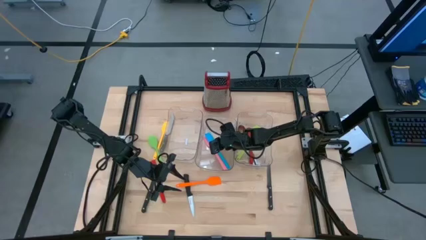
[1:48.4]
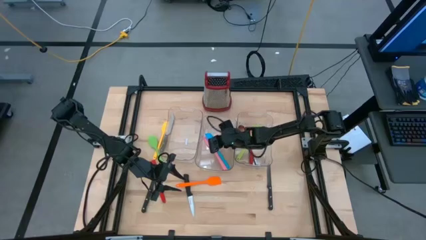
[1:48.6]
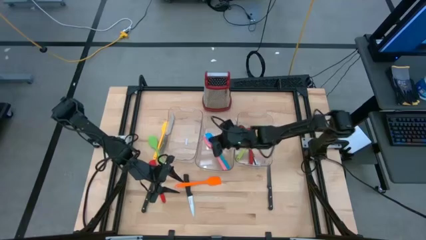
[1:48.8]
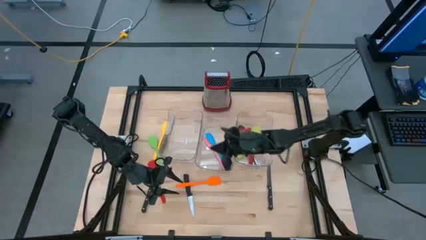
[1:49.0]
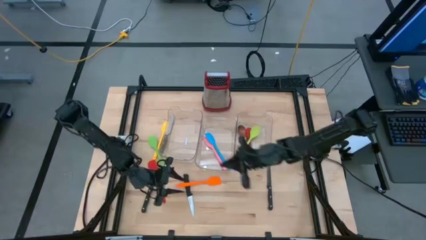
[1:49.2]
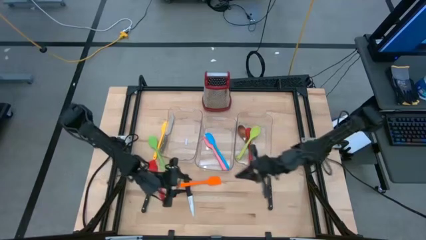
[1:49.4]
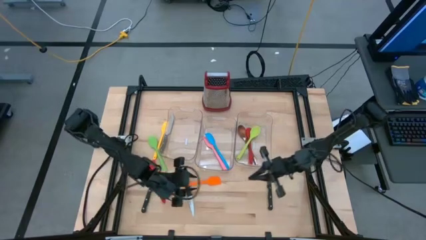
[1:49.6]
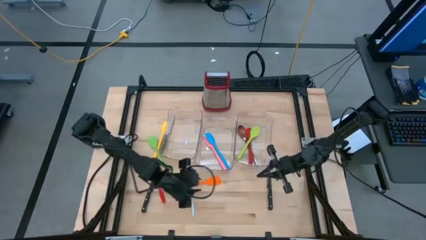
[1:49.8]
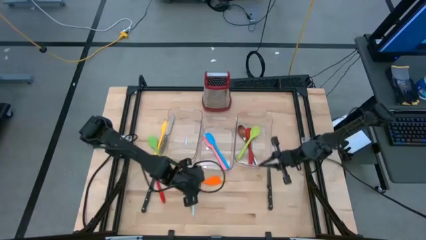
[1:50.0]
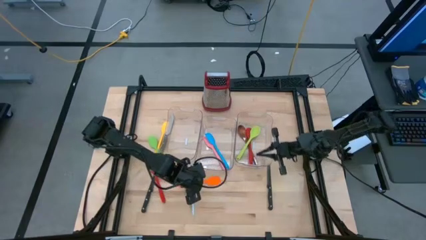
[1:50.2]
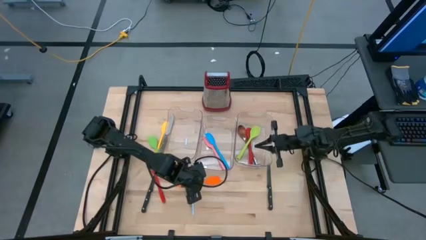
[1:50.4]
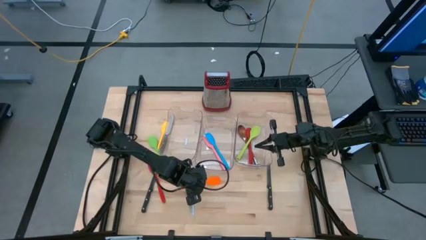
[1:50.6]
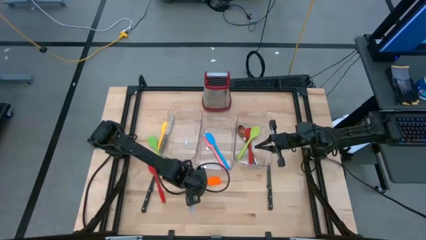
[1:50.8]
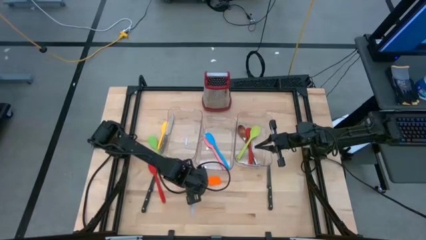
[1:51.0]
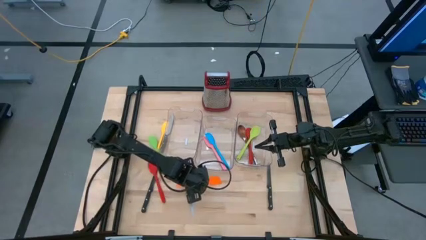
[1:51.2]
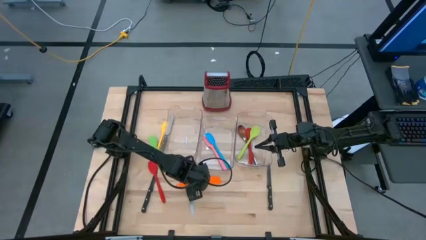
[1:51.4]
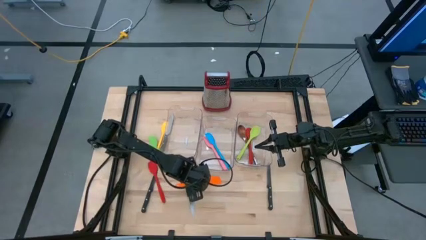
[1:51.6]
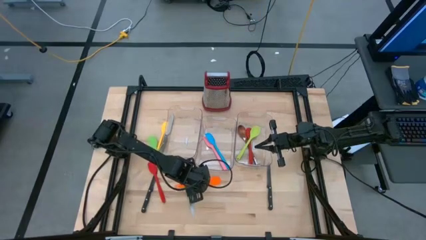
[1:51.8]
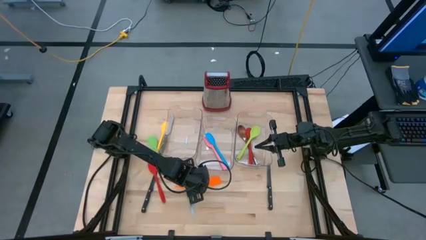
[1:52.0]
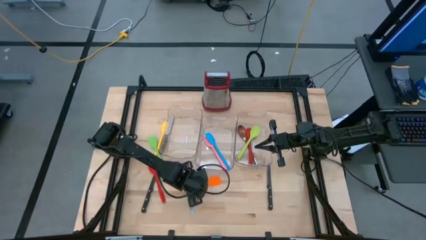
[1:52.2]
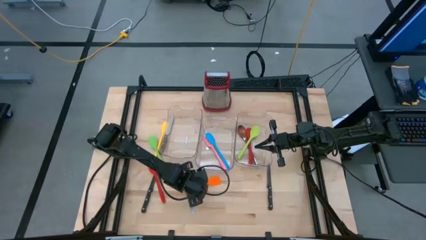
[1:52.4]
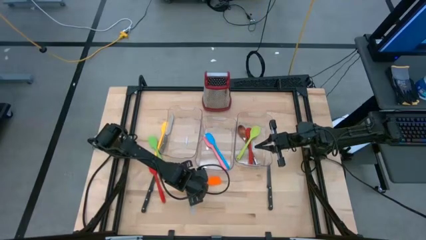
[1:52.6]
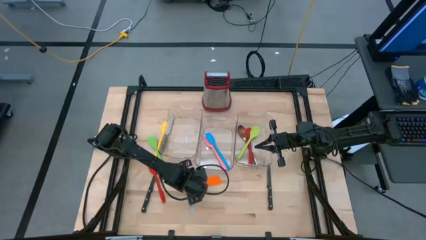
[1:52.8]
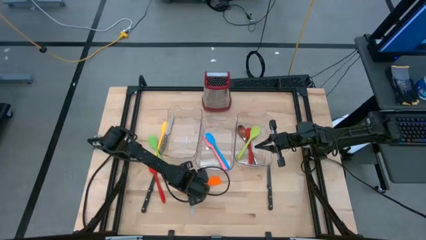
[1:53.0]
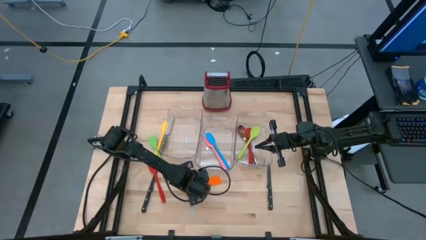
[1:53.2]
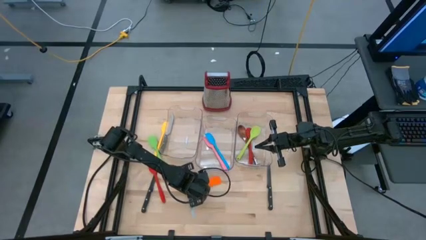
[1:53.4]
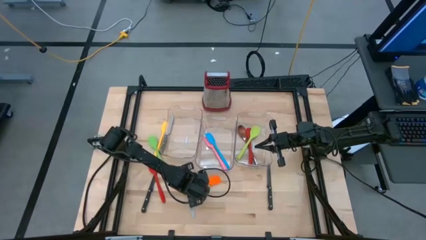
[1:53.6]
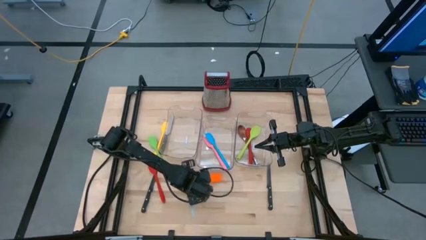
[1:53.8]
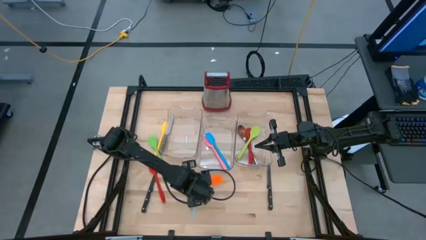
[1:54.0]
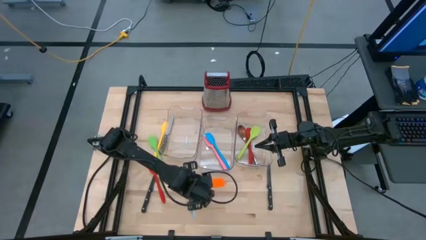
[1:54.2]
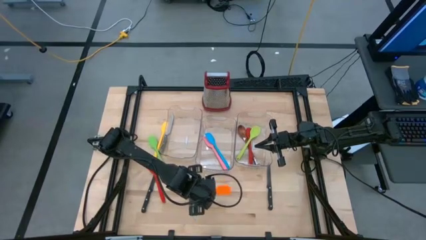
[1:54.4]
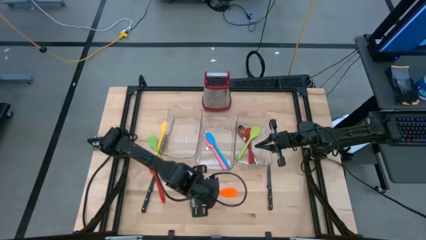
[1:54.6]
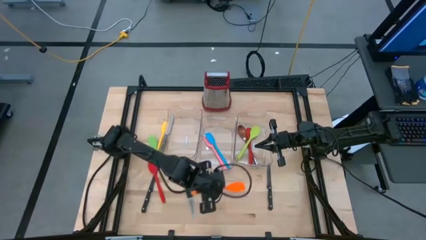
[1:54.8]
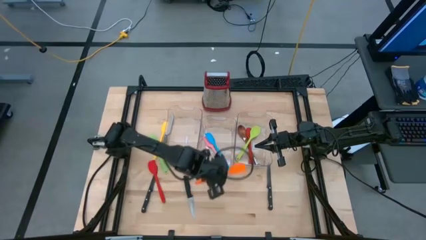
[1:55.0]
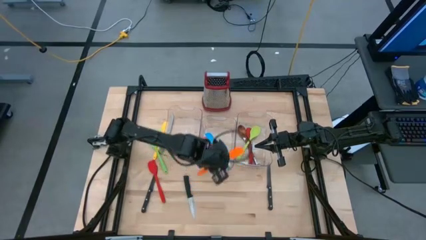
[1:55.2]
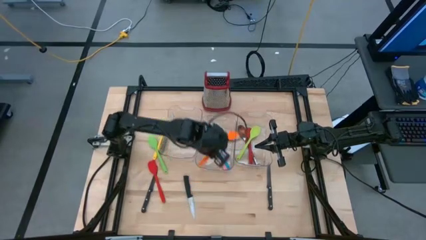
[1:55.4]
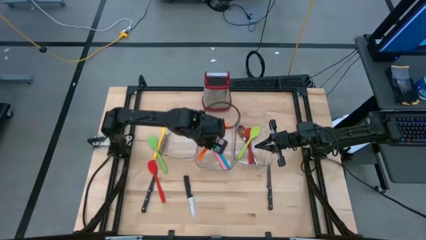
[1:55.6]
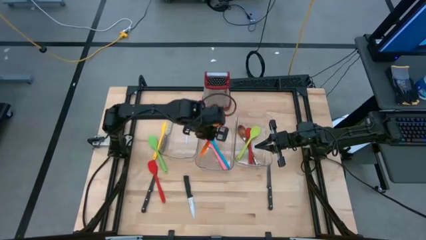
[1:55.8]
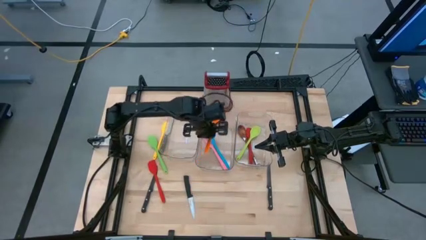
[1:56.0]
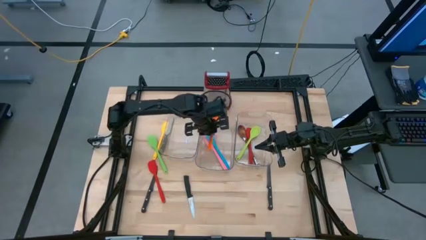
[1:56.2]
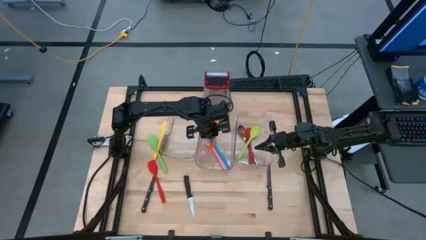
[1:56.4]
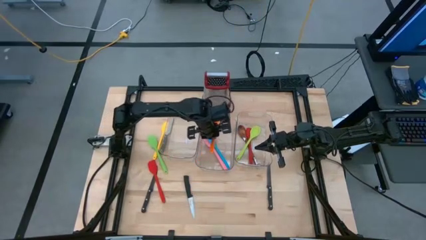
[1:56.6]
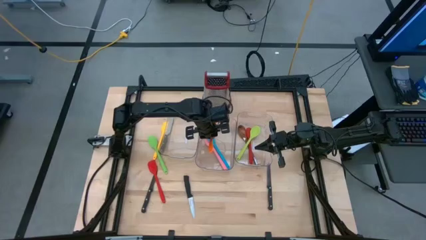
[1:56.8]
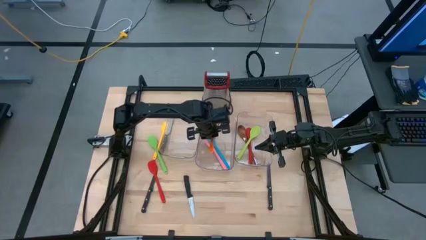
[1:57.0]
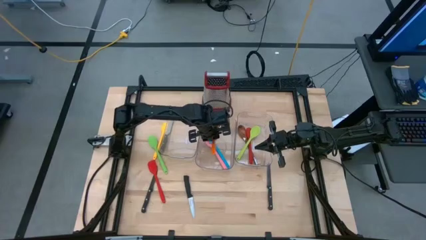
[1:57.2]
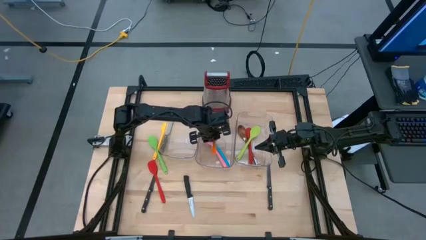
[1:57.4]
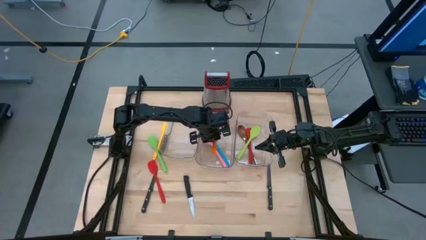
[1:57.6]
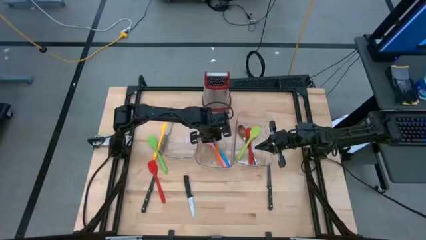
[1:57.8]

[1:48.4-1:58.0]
Task: Pick & Place Kitchen Items
Put the orange spatula into the middle transparent bin

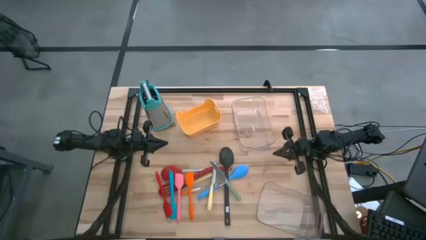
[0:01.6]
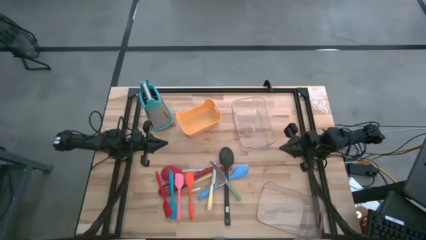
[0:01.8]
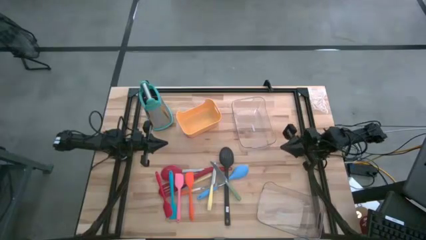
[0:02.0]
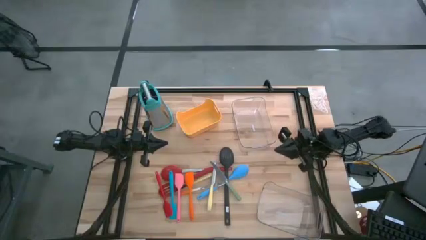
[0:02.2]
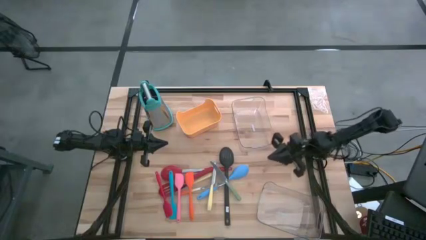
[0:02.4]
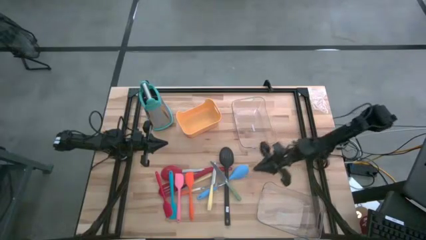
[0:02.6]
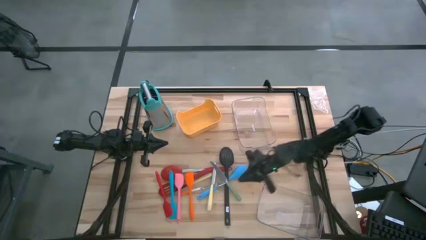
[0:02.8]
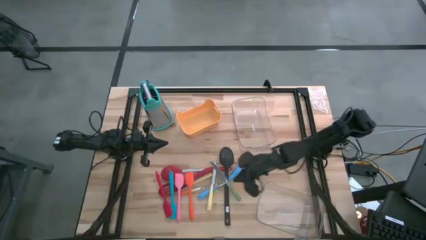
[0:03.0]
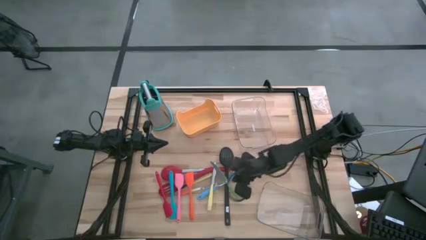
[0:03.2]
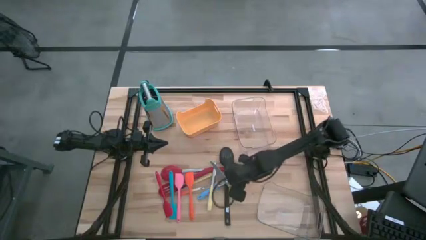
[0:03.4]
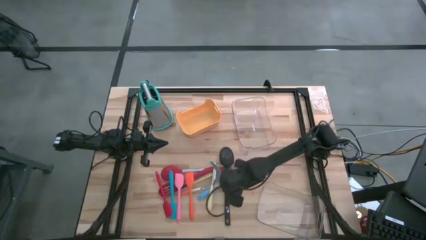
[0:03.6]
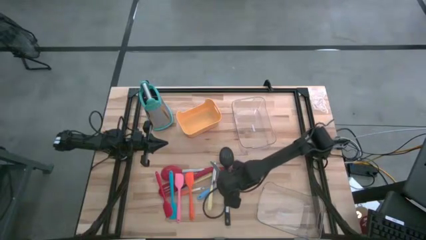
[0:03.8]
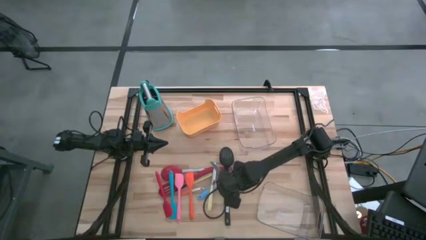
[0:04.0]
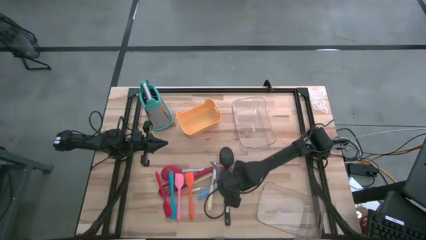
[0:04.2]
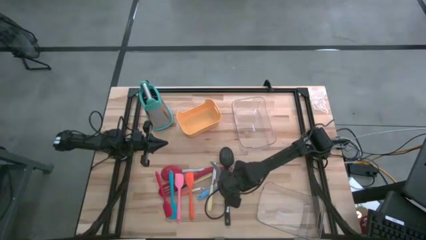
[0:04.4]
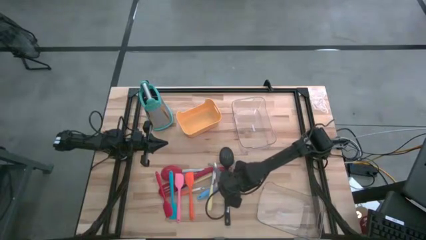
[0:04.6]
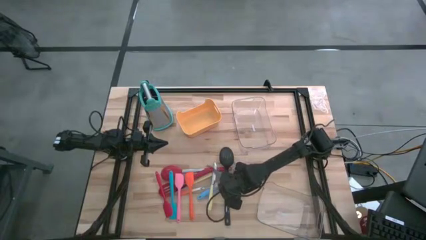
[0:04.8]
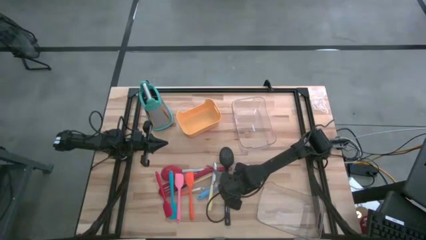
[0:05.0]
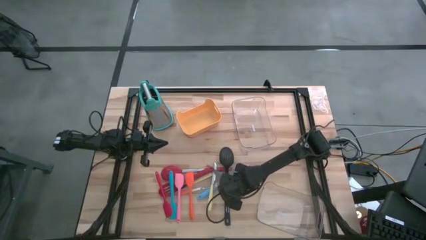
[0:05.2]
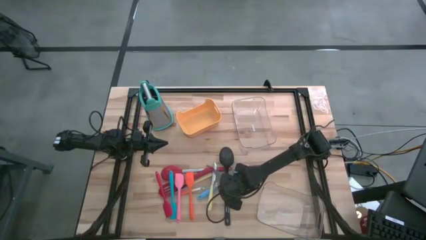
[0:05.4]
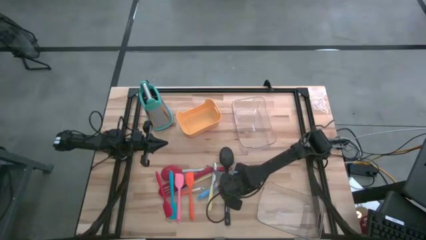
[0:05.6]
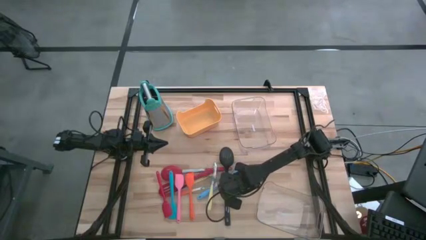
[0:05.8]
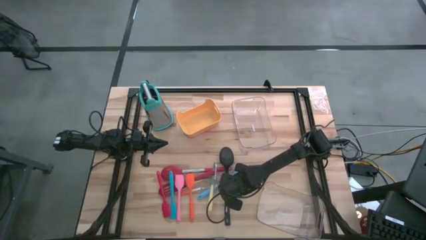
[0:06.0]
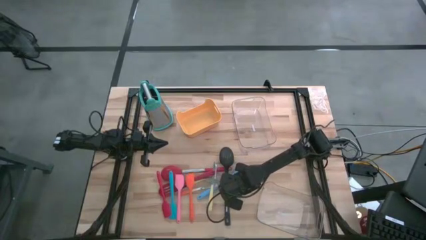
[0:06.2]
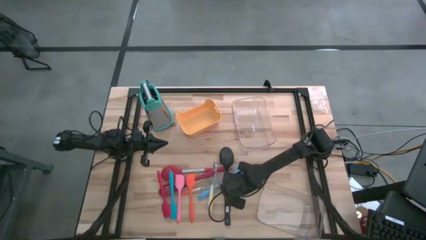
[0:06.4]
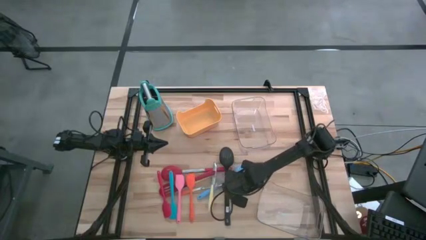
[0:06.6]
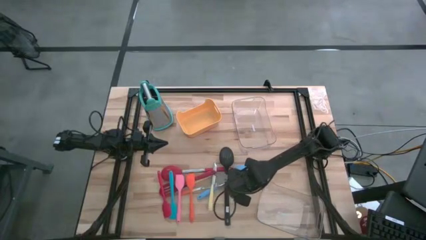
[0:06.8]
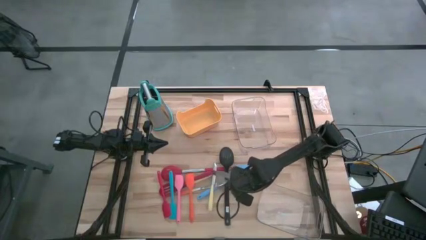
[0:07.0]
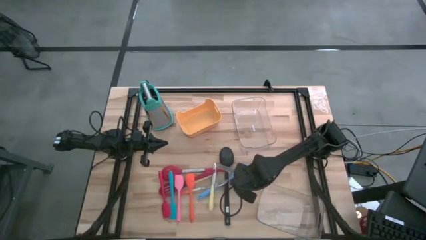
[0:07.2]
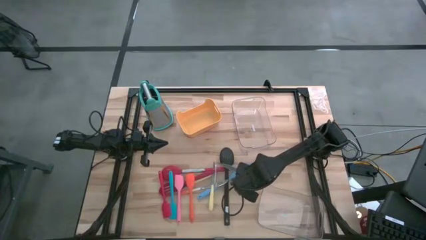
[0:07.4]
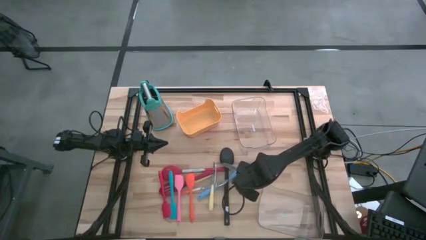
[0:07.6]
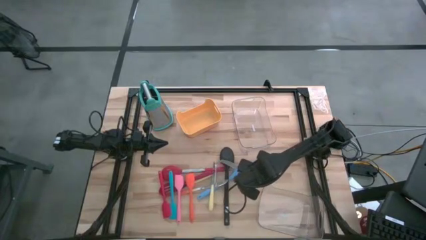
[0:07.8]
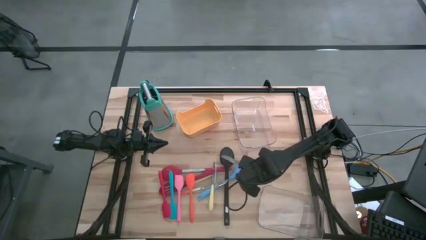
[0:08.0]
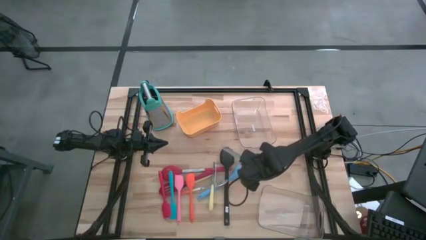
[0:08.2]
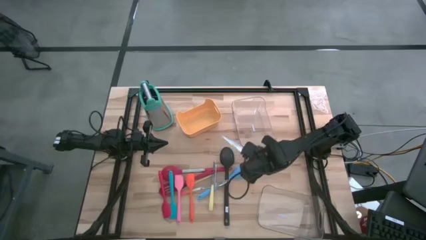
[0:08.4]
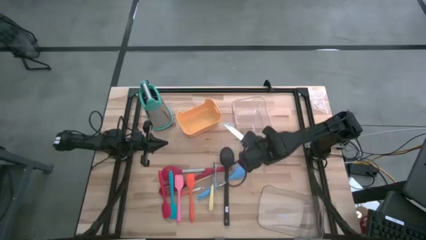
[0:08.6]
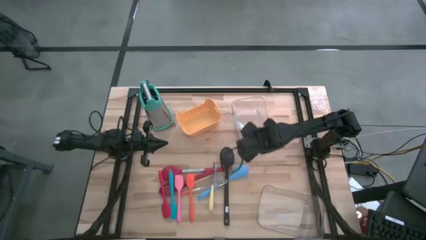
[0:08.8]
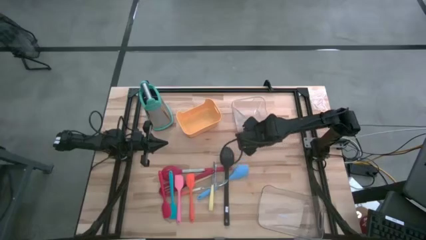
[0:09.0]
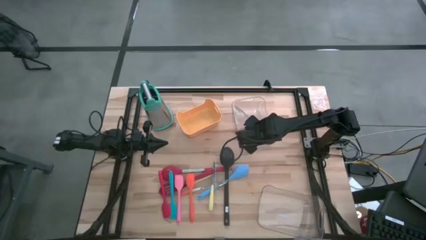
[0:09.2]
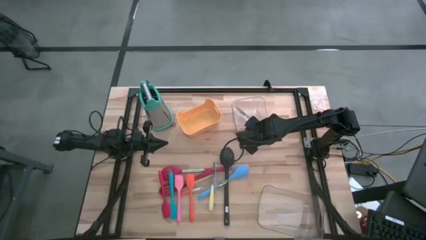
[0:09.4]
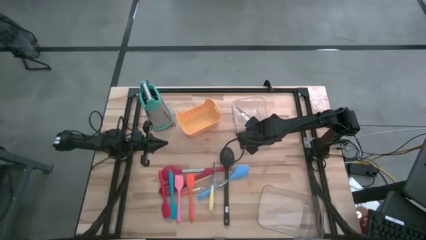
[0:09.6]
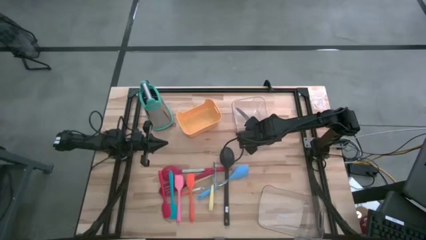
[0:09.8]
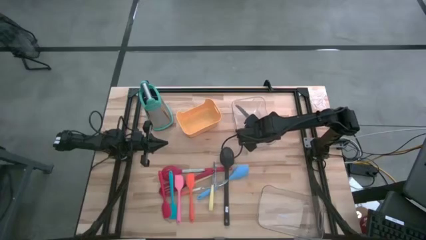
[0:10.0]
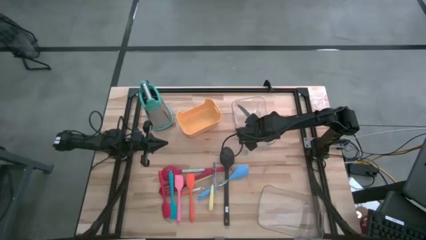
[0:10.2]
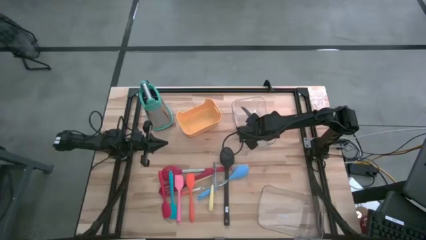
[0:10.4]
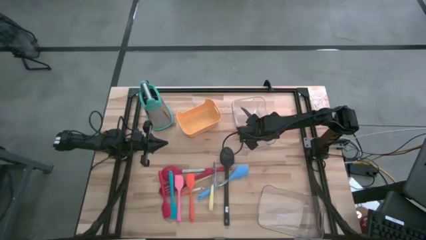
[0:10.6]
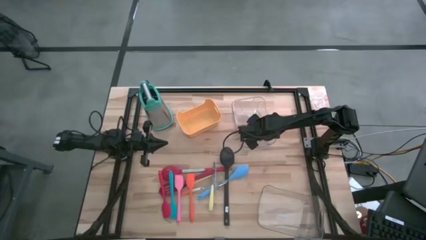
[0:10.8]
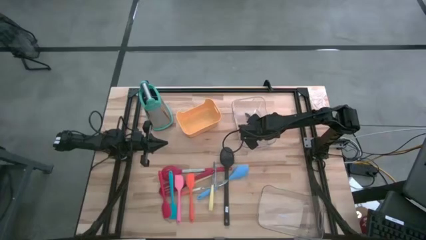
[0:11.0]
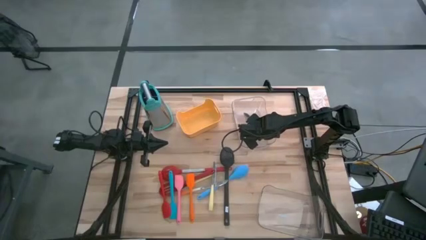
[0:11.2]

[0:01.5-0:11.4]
Task: Pick & Place Kitchen Items
Put the green kitchen knife into the top transparent bin
